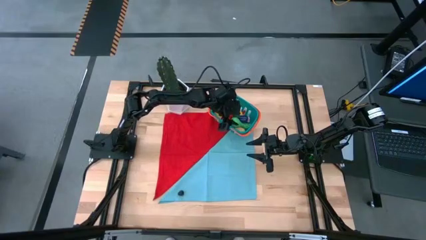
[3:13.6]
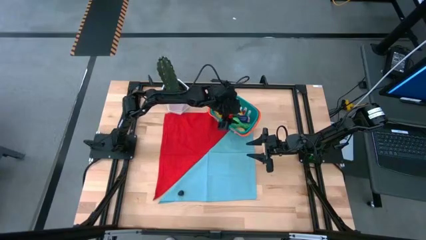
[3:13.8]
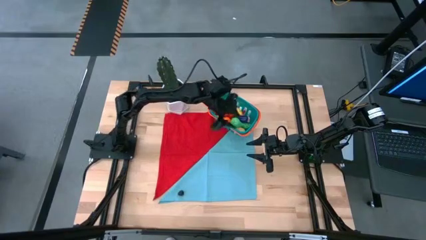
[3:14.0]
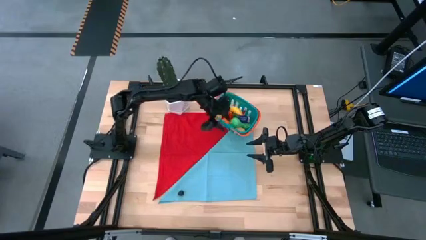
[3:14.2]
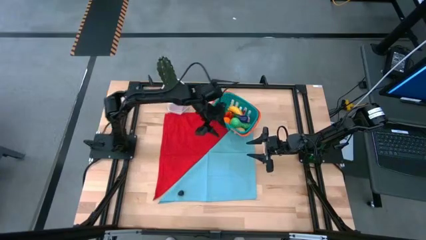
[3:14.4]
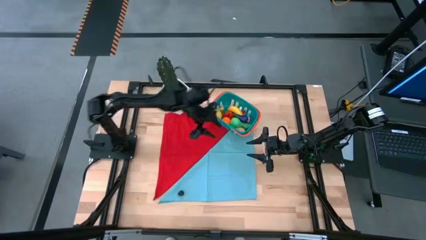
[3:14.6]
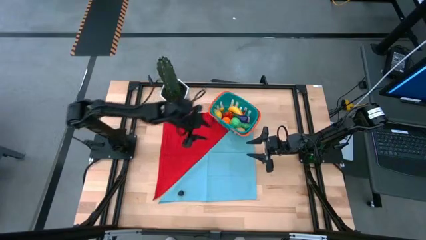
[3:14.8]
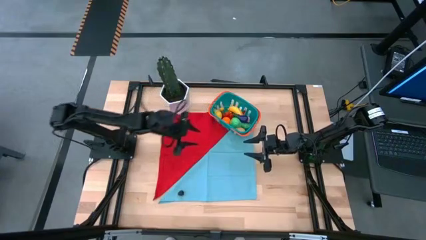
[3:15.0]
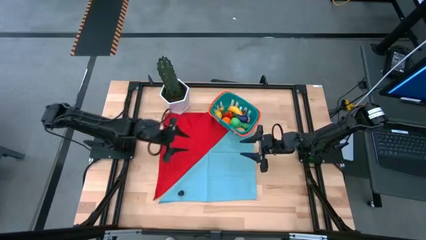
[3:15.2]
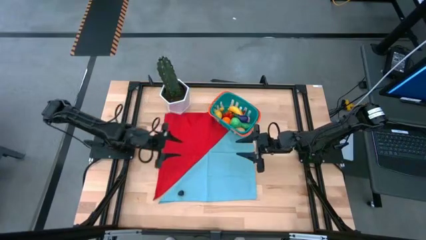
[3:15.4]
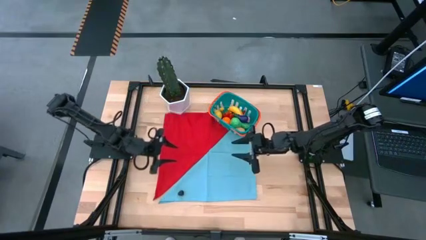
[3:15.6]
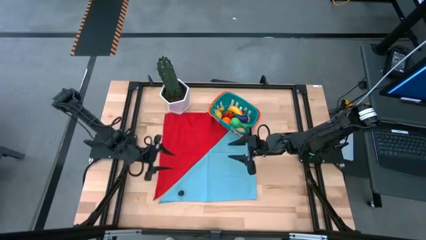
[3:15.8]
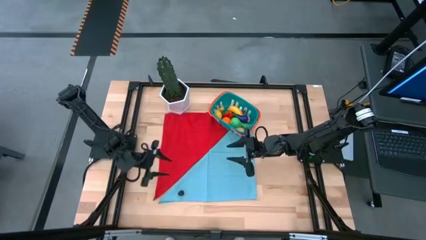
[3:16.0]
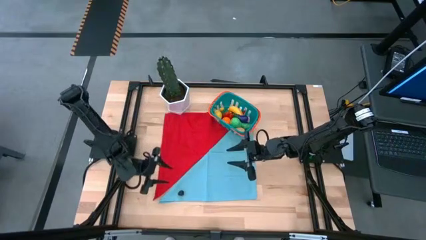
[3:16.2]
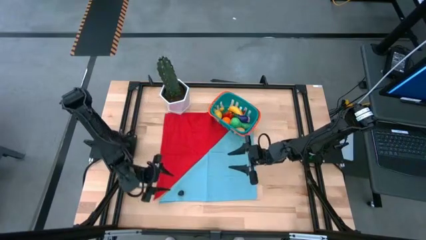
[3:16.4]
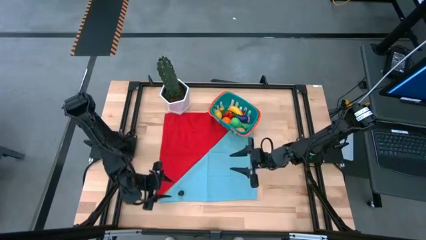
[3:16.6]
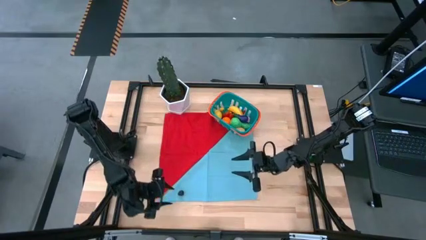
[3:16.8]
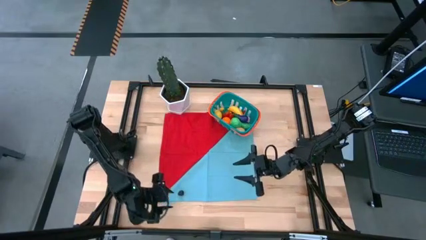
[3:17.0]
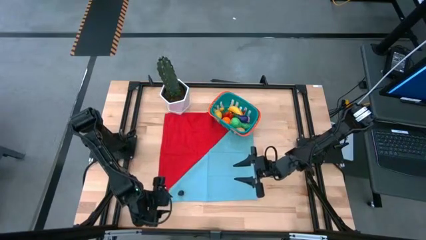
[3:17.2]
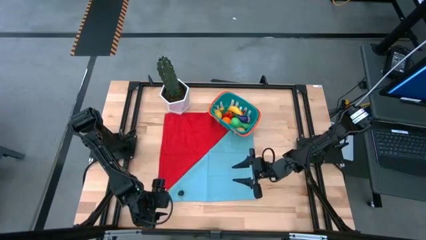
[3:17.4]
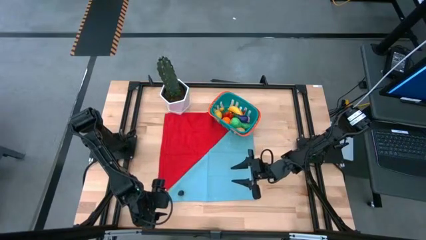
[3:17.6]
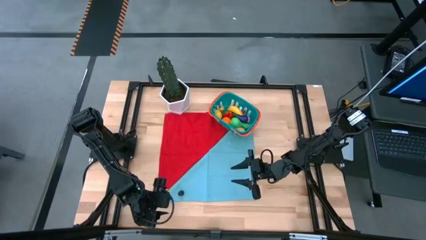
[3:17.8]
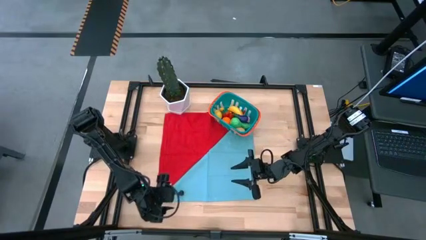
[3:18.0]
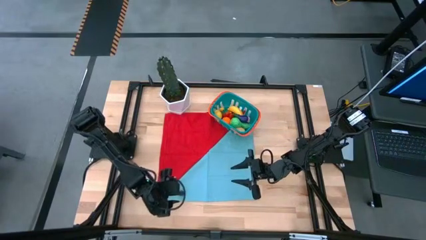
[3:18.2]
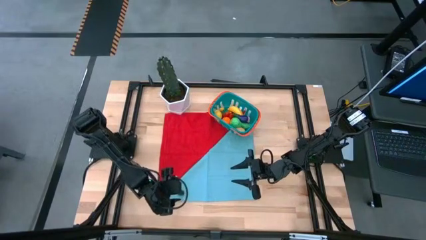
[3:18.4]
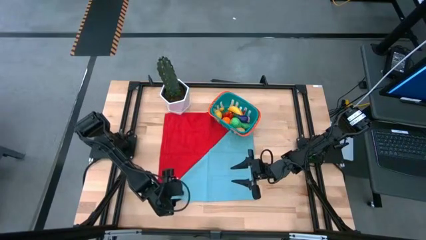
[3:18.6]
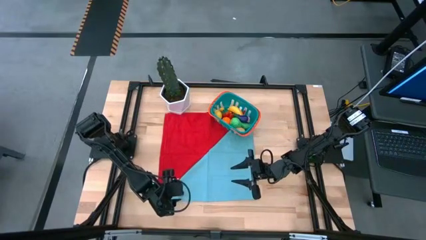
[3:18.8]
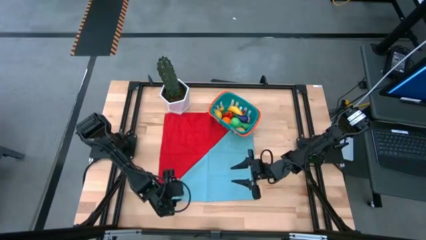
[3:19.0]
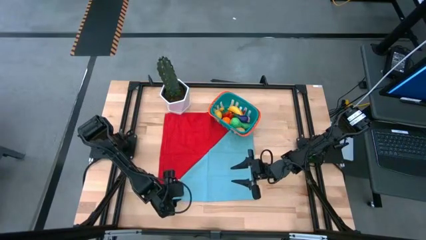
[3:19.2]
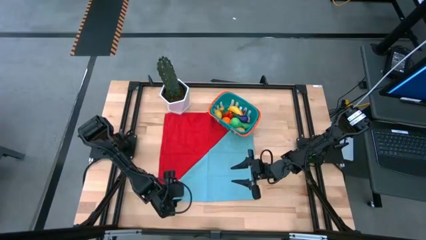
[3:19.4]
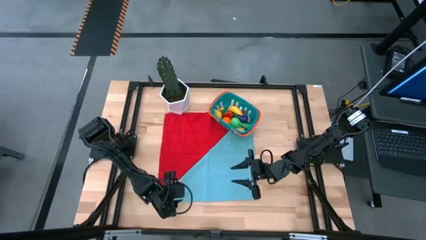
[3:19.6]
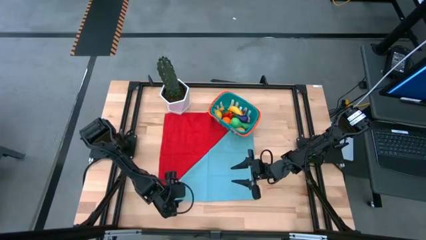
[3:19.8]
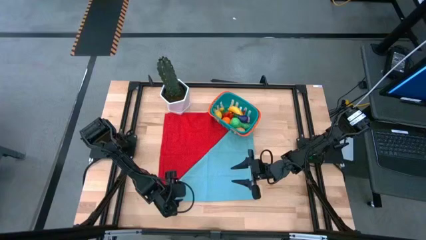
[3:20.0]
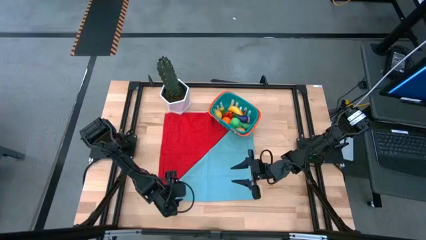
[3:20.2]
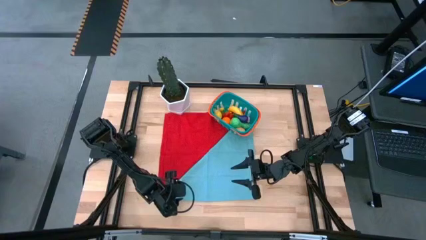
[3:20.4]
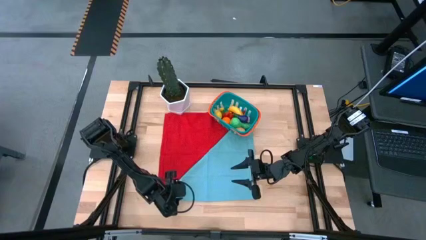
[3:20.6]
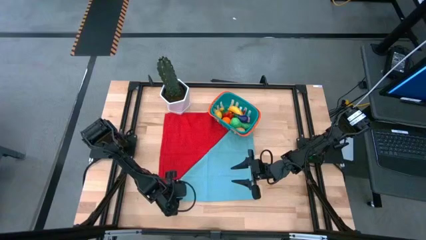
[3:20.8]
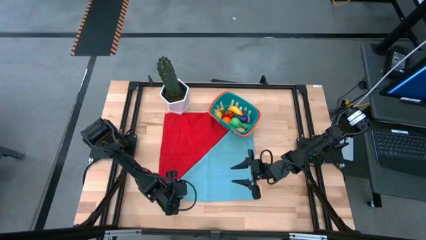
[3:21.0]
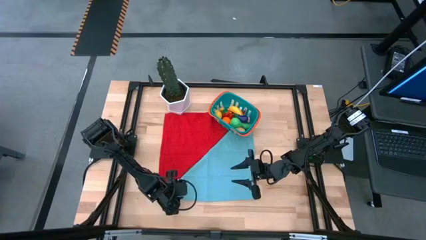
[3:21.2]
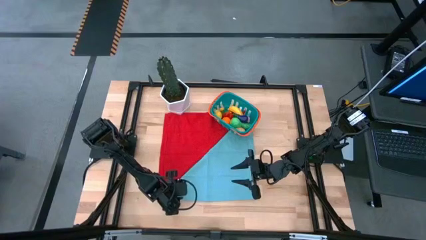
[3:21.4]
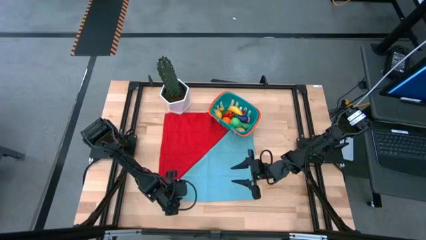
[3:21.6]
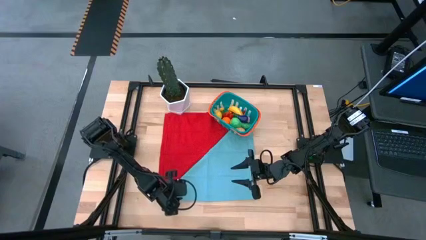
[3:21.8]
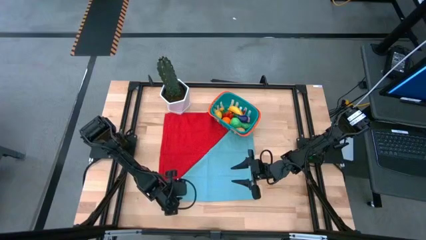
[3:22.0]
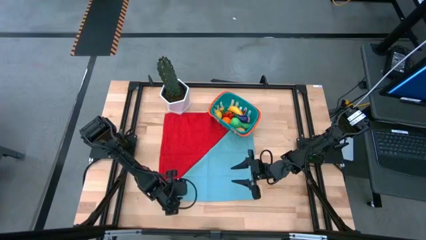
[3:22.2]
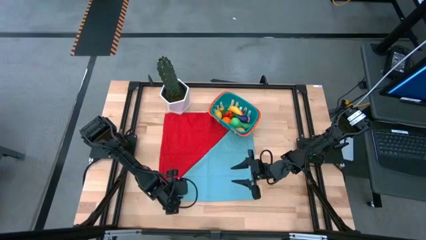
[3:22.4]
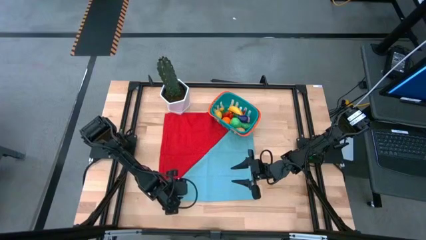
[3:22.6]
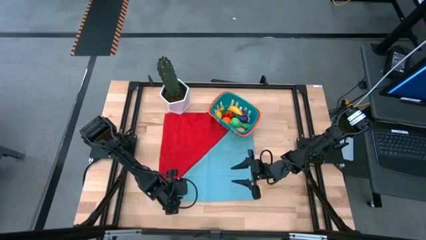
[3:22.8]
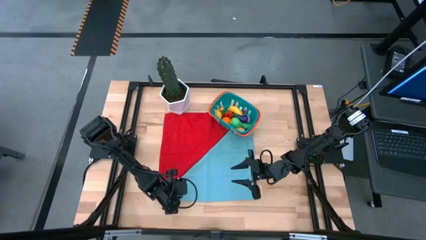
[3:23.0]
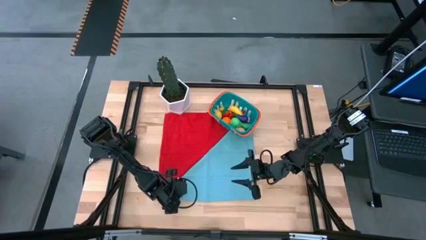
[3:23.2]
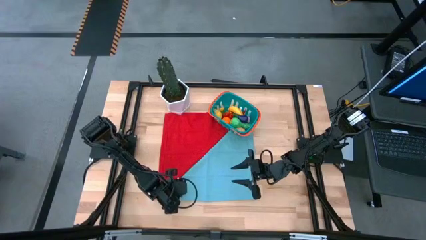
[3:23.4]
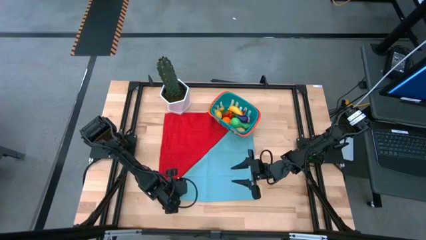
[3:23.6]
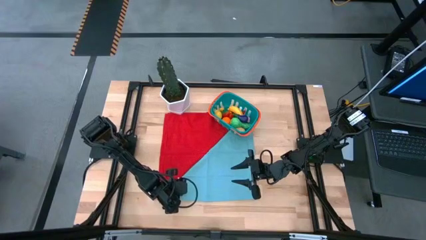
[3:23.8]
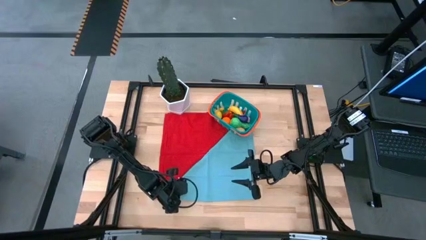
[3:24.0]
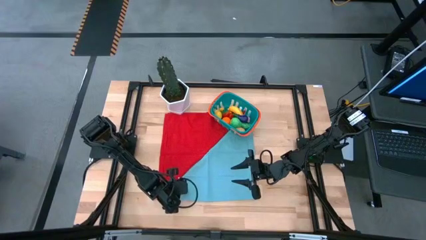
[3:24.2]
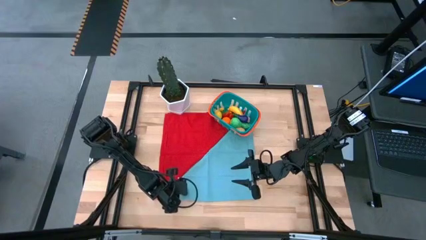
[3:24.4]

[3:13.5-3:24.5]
Task: Pick and placing Produce into tupperware
Put the blackberry into the blue basket
